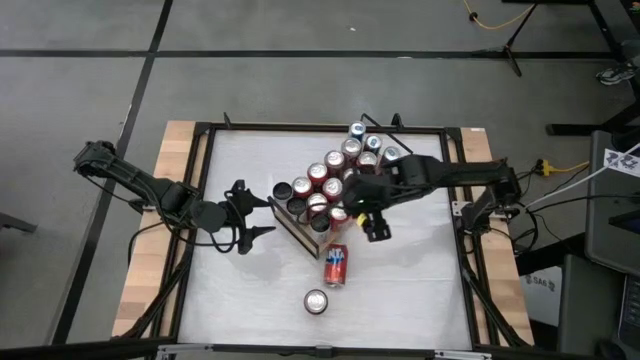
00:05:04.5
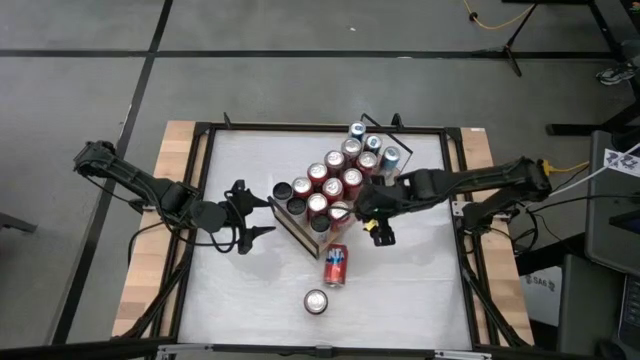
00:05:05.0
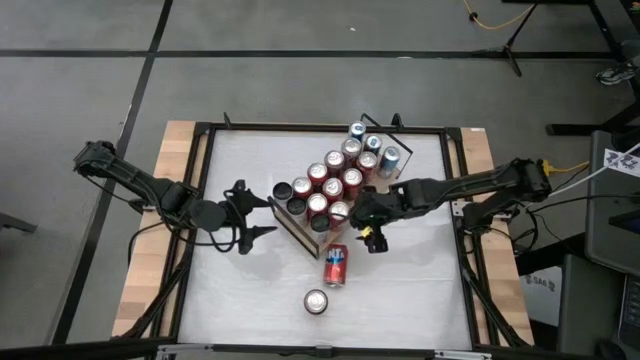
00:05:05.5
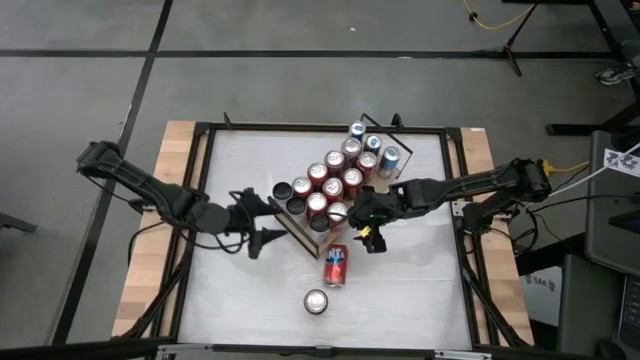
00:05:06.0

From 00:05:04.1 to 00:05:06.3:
Task: Place canned beverage on shelf
Adjust the soda cans

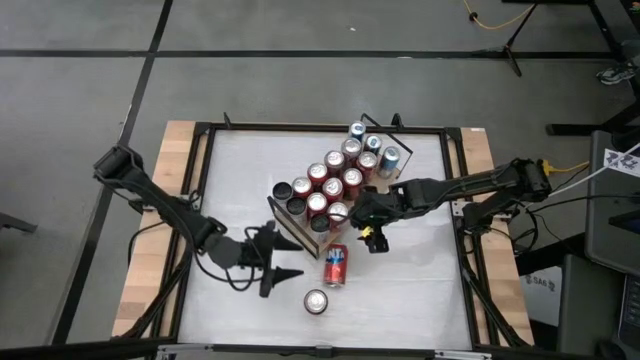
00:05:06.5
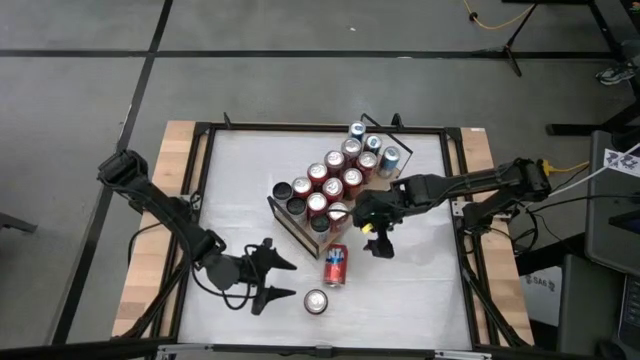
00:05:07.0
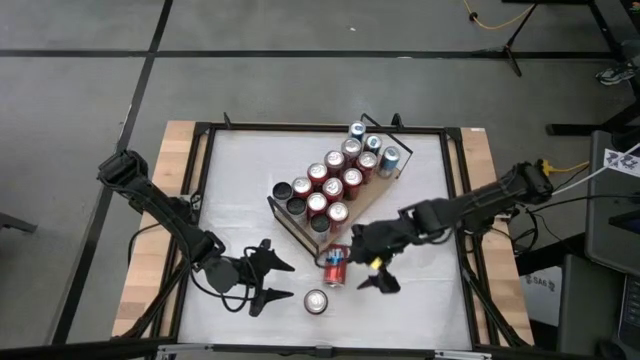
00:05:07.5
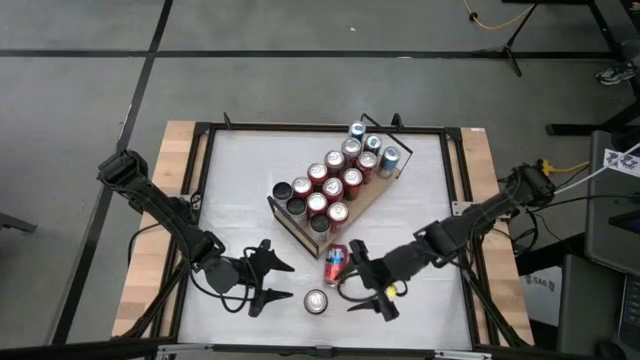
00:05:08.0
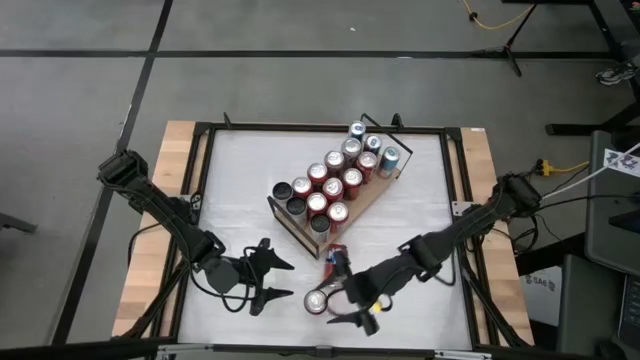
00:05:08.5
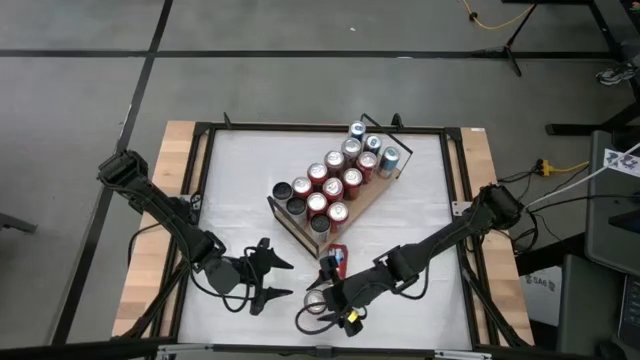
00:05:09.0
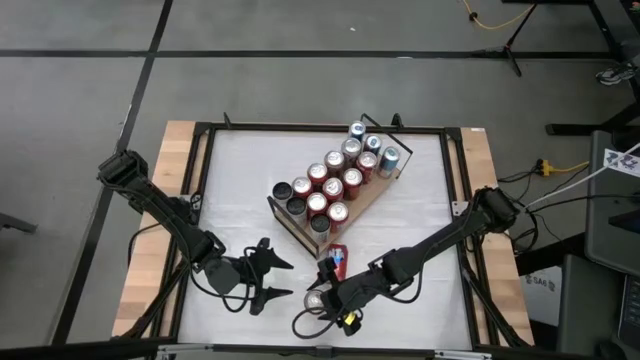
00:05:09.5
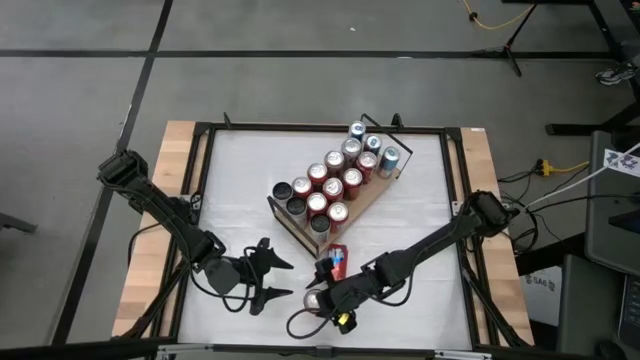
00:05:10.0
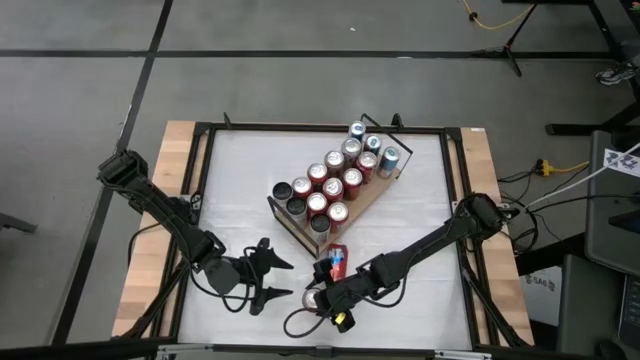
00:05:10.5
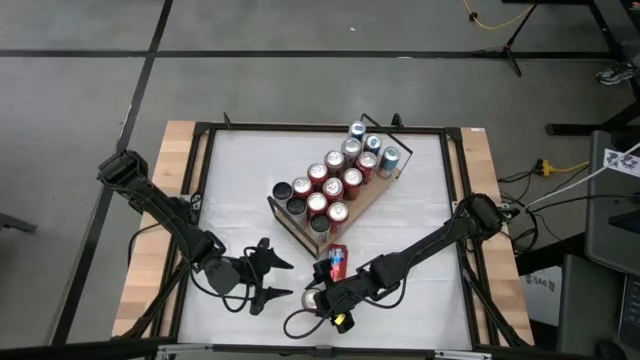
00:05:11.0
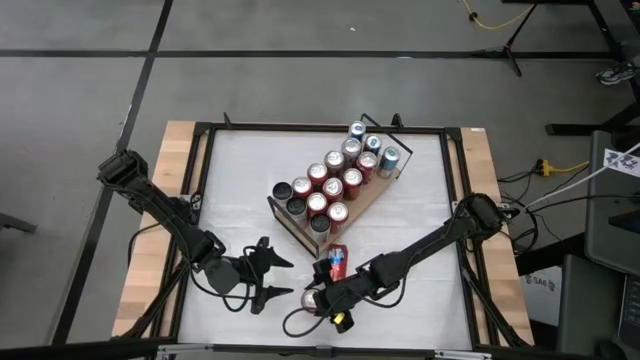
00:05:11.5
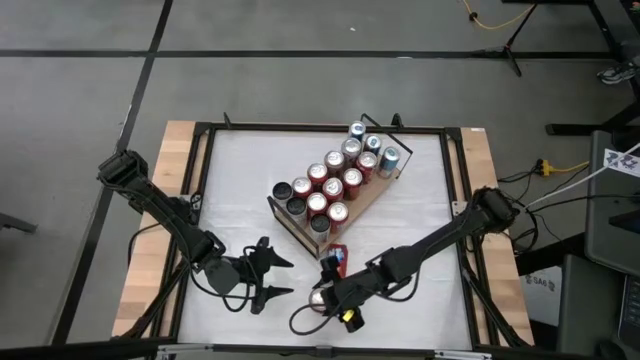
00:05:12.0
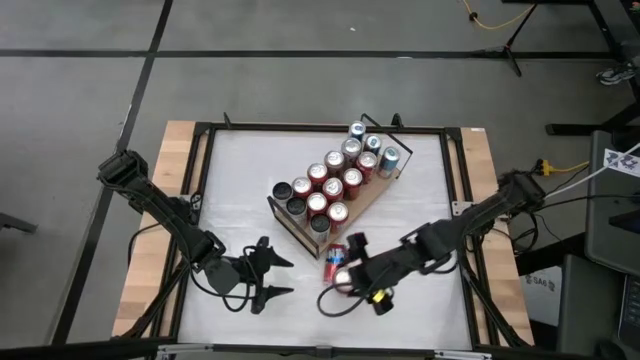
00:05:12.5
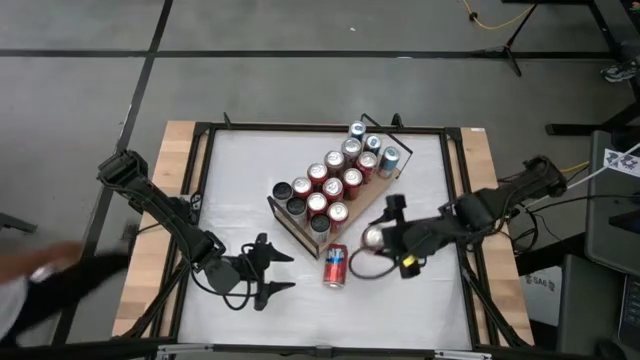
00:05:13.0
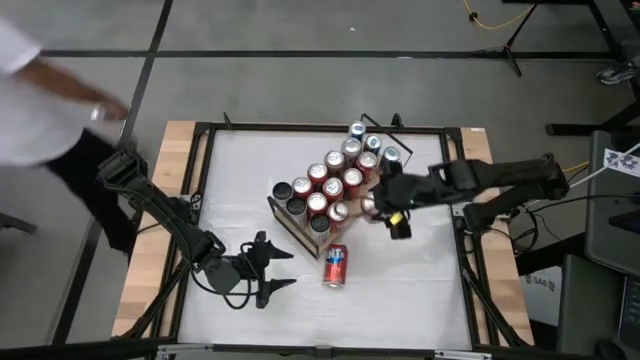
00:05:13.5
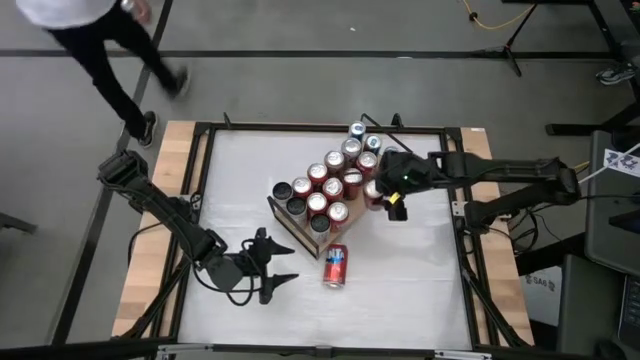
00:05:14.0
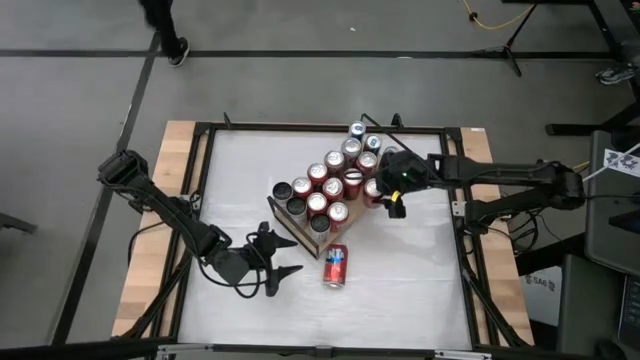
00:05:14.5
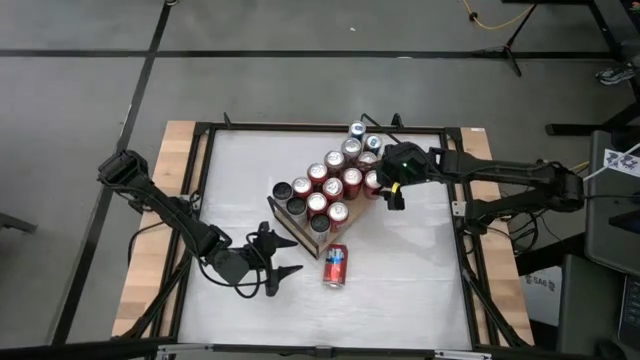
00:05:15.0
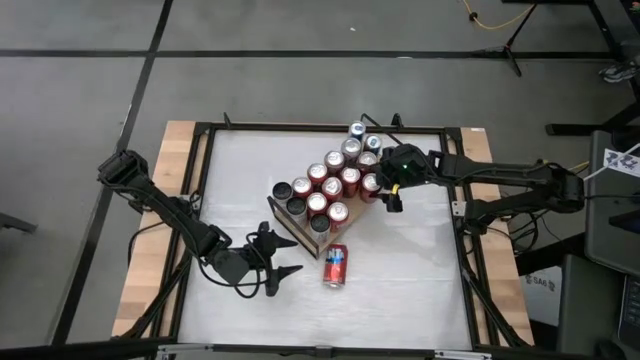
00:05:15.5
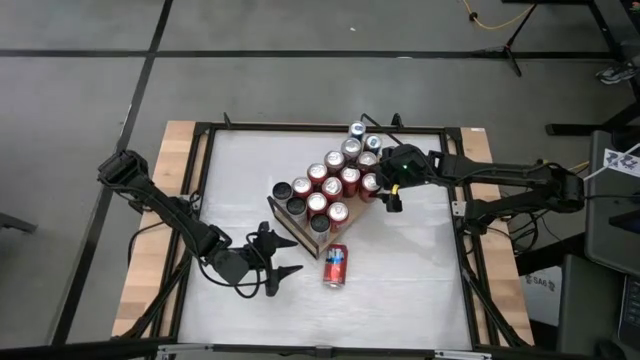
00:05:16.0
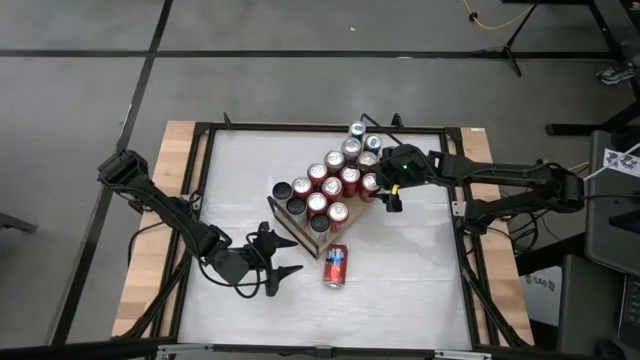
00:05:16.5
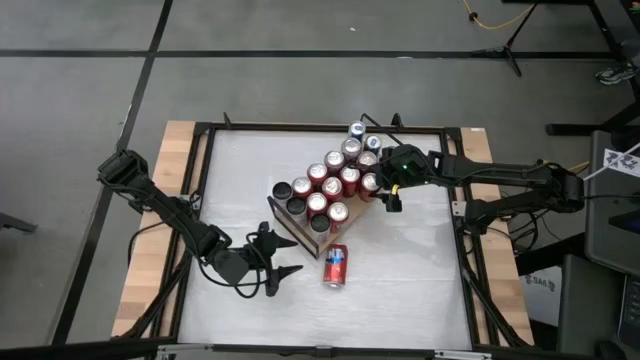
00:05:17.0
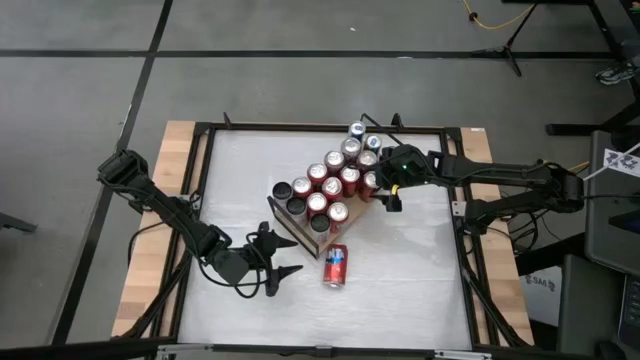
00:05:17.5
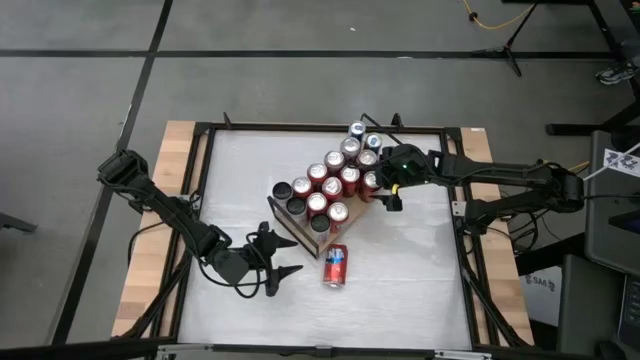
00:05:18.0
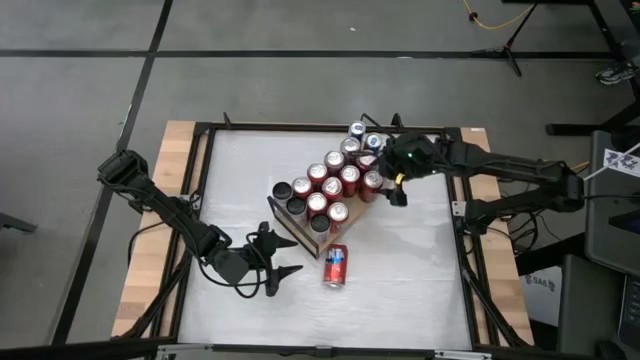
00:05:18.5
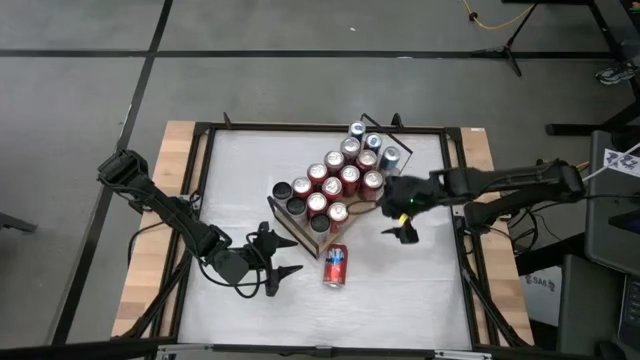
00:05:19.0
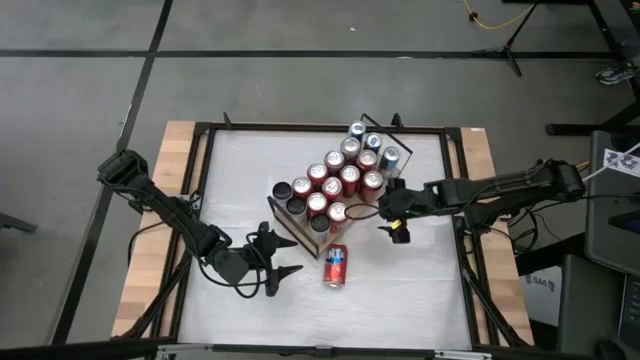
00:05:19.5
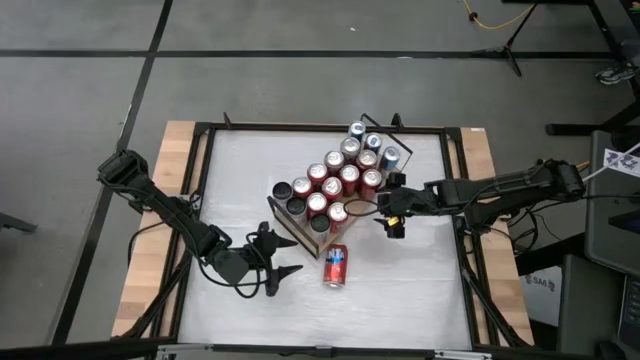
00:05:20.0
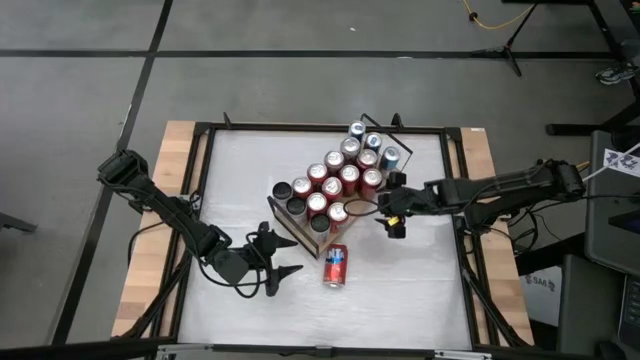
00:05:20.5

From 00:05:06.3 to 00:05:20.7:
Put the red black soda can on the shelf aligned with the other red black soda can

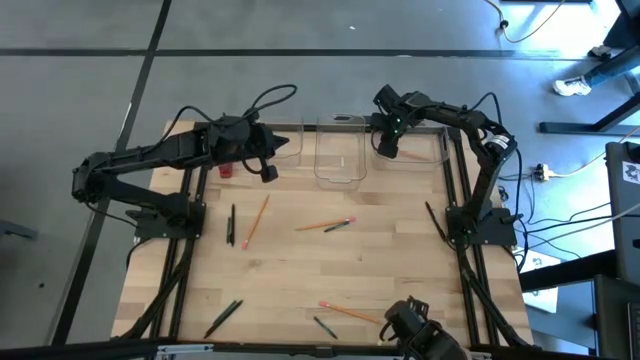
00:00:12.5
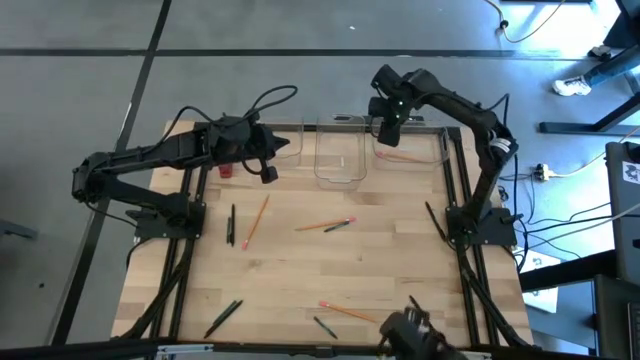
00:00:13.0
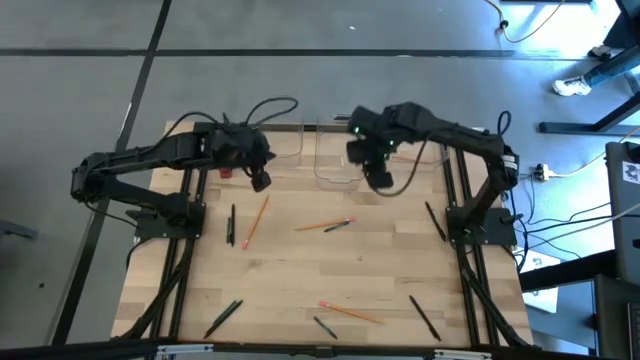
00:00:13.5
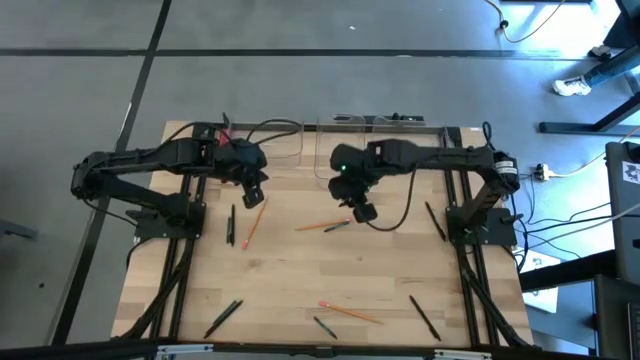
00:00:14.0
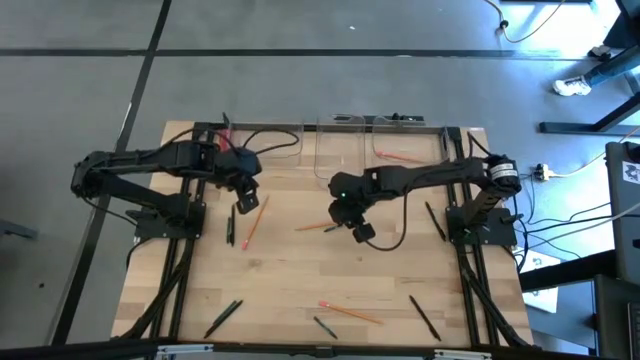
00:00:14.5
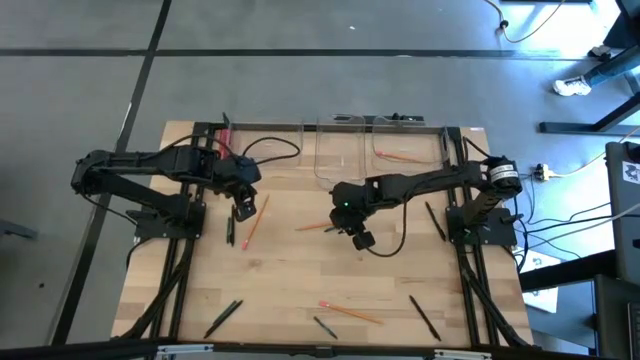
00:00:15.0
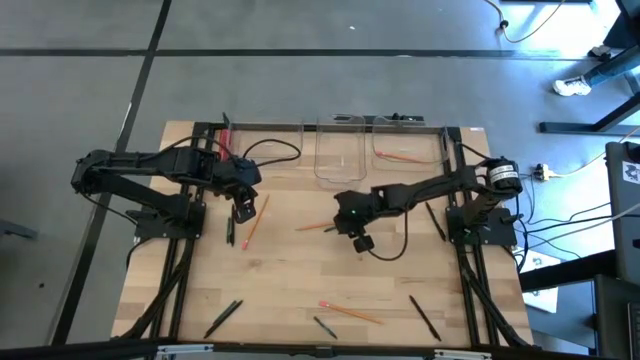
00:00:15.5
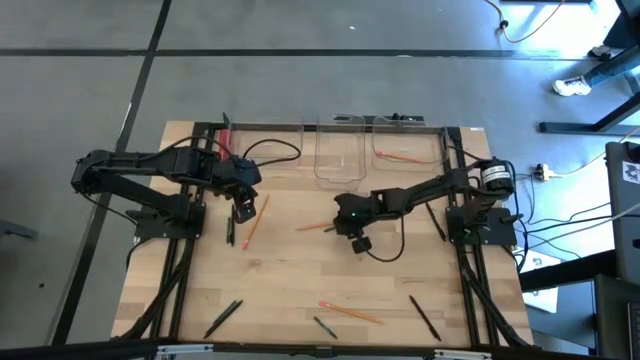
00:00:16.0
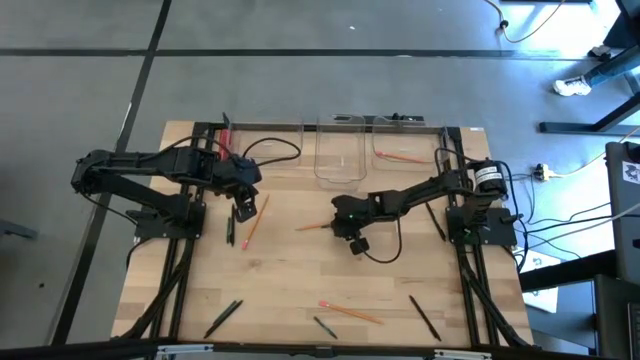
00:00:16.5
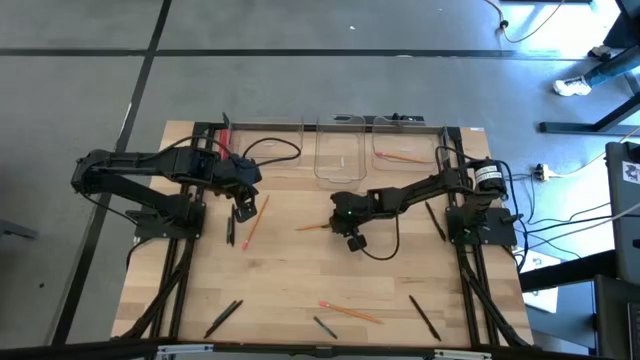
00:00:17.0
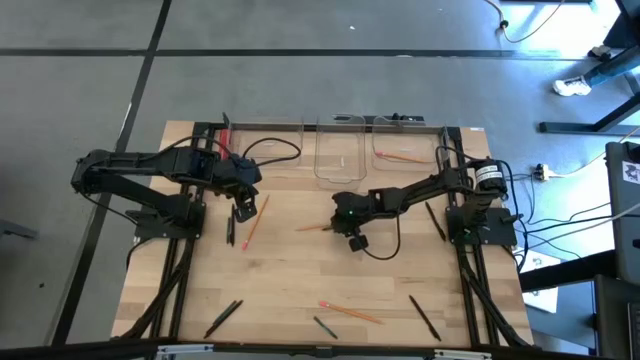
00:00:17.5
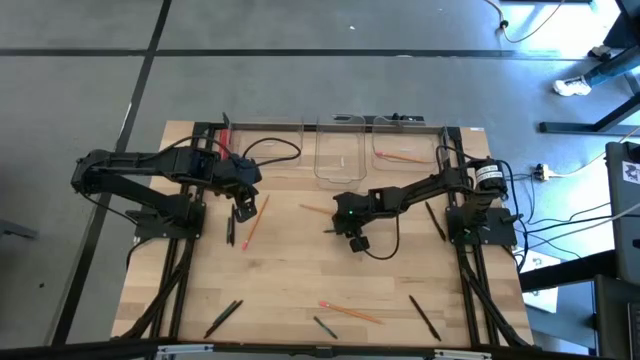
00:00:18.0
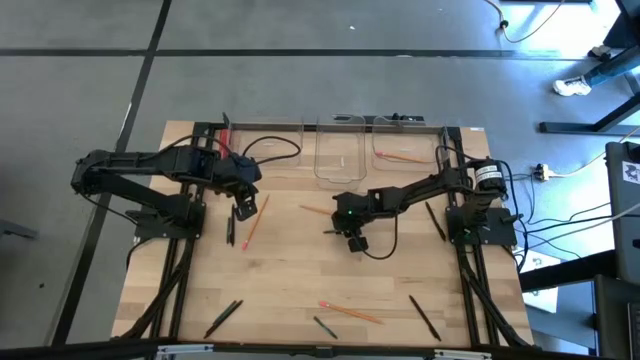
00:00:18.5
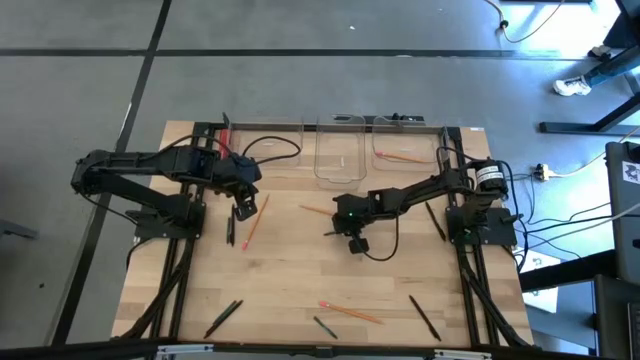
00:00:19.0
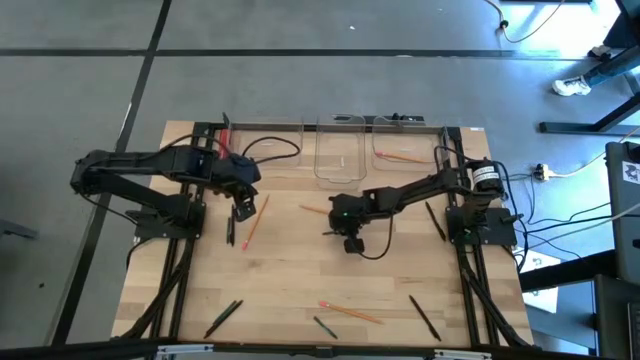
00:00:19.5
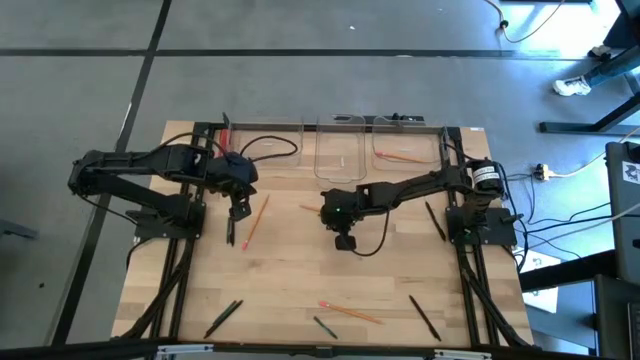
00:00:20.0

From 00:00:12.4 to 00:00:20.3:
Task: Sort crayons/erasers/pens/pencils in bins
Put the green crayon into the middle transparent bin
